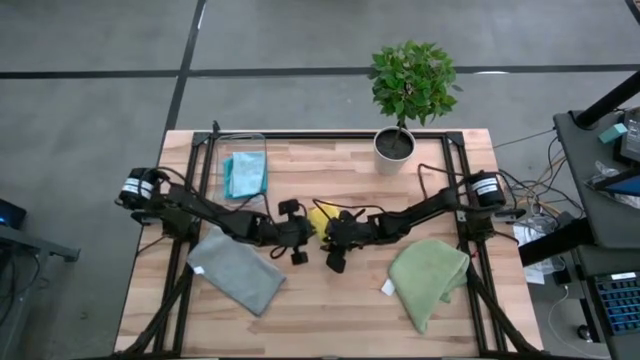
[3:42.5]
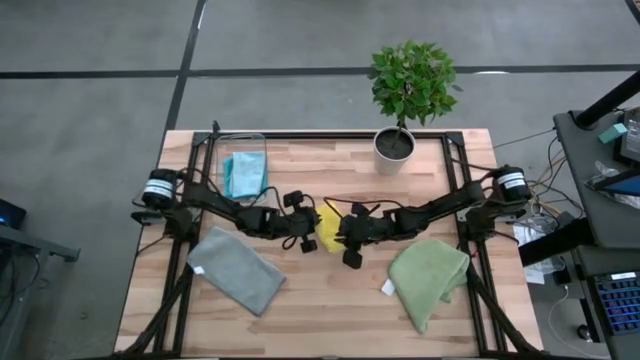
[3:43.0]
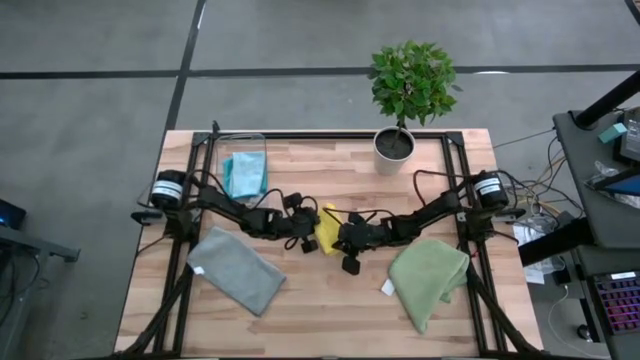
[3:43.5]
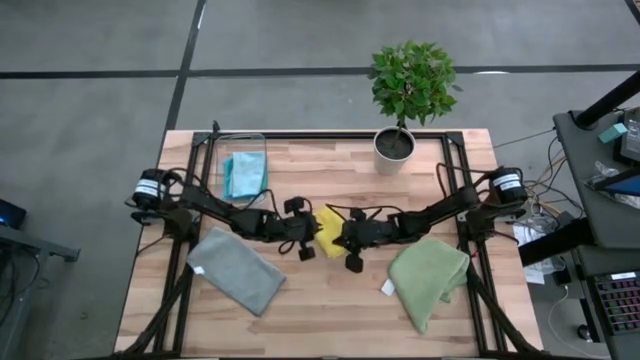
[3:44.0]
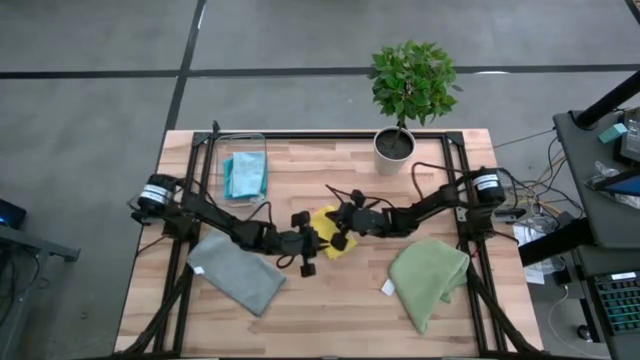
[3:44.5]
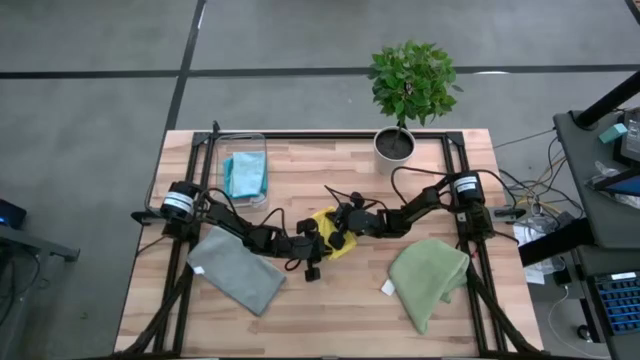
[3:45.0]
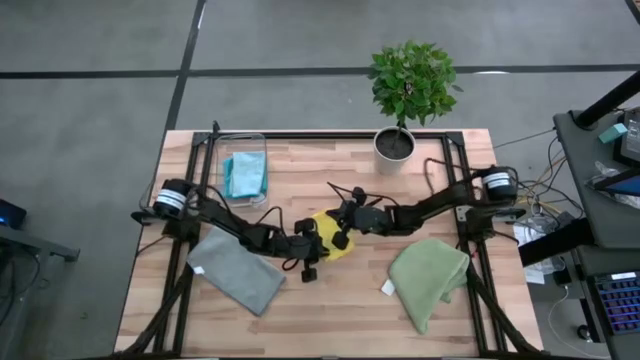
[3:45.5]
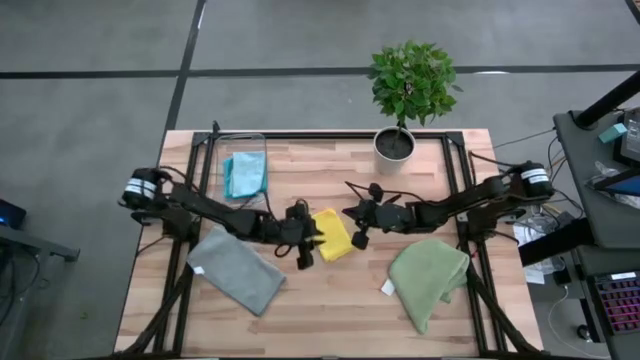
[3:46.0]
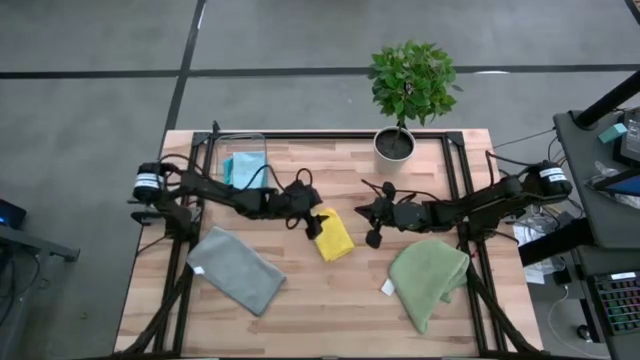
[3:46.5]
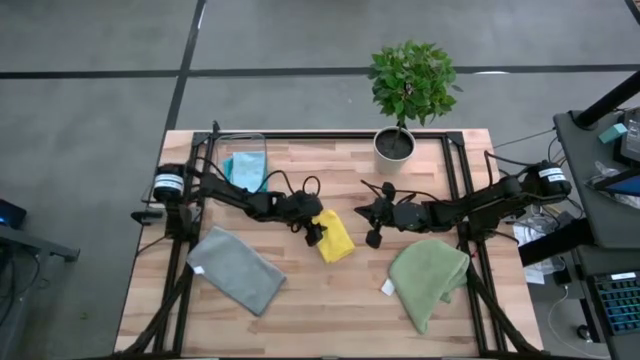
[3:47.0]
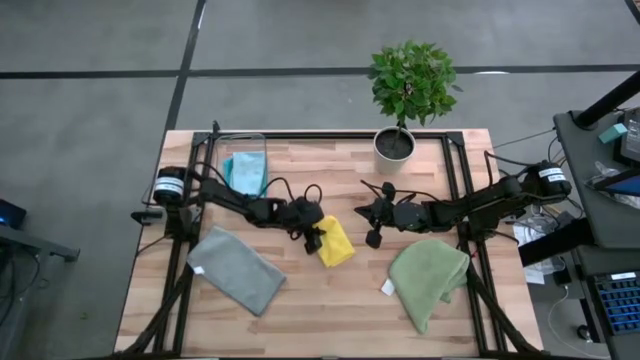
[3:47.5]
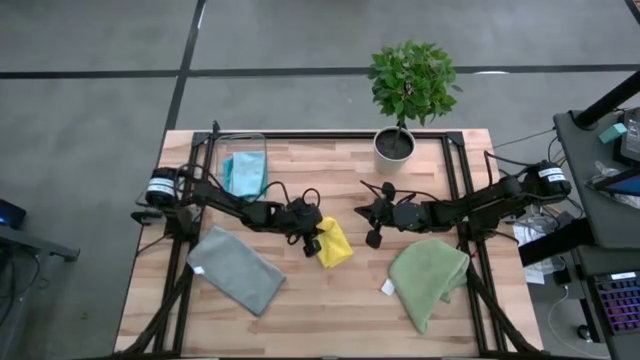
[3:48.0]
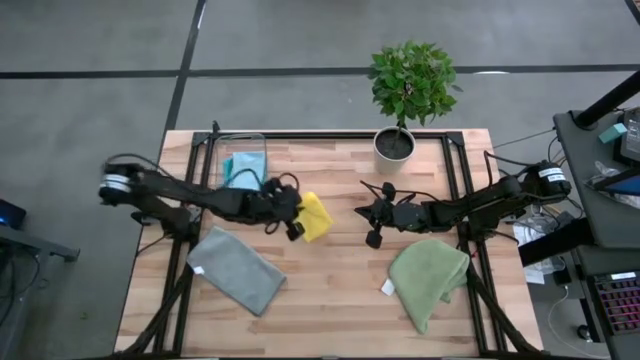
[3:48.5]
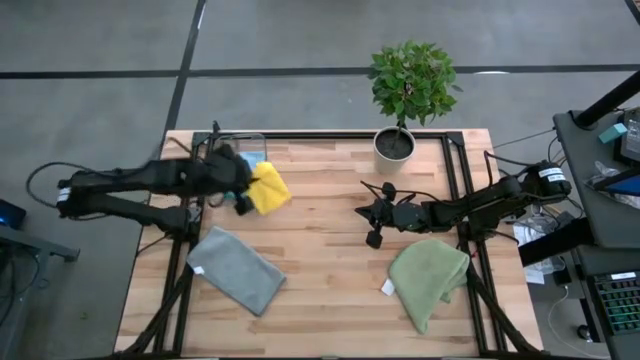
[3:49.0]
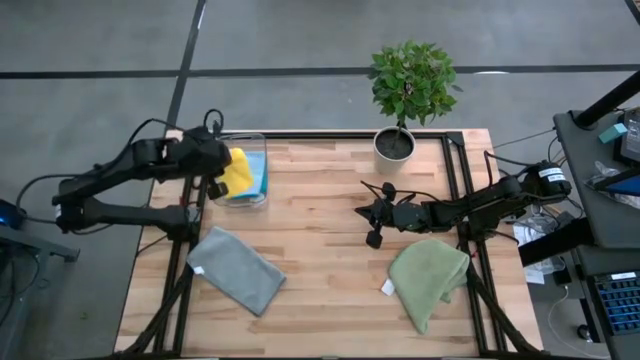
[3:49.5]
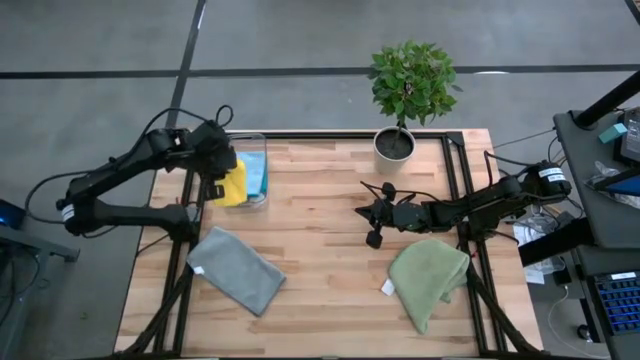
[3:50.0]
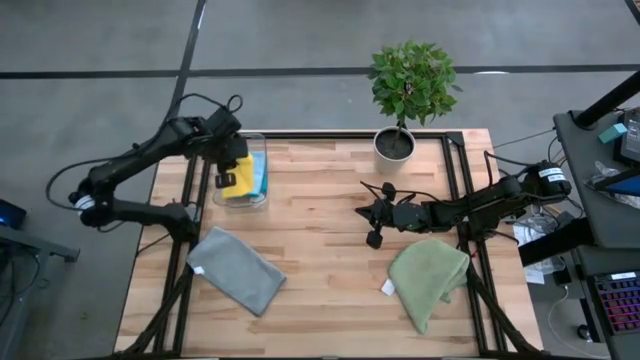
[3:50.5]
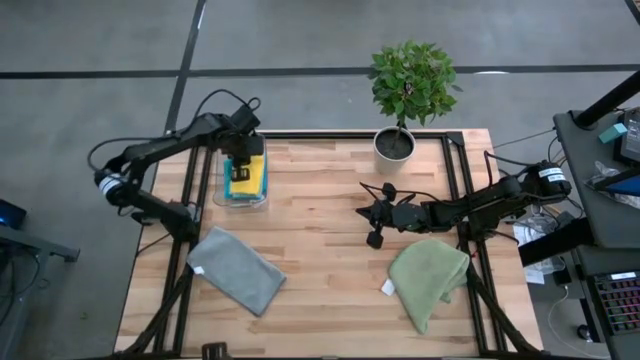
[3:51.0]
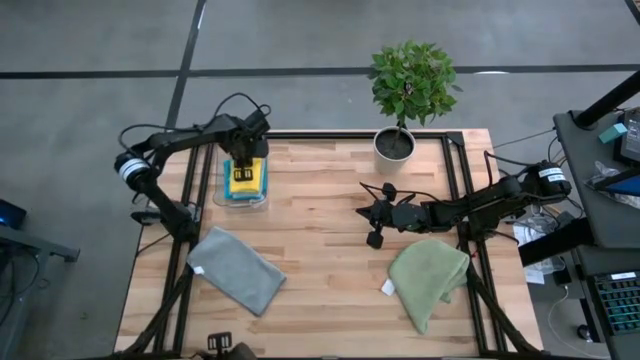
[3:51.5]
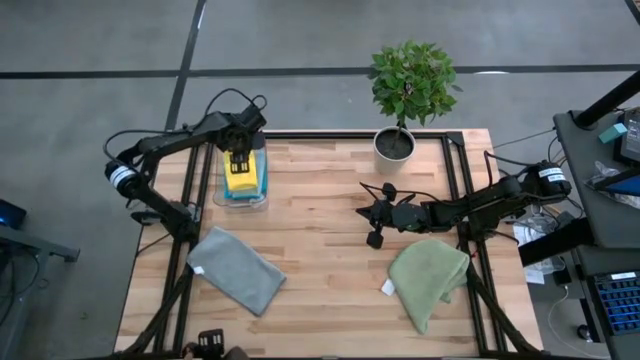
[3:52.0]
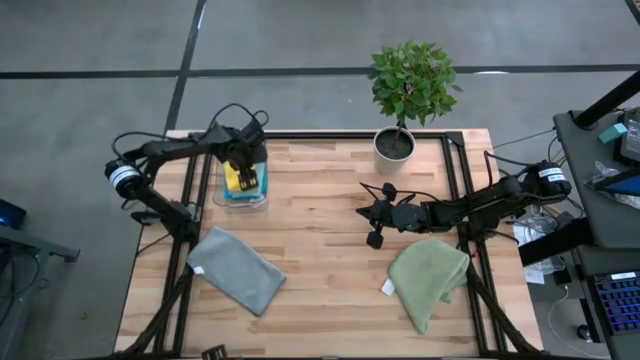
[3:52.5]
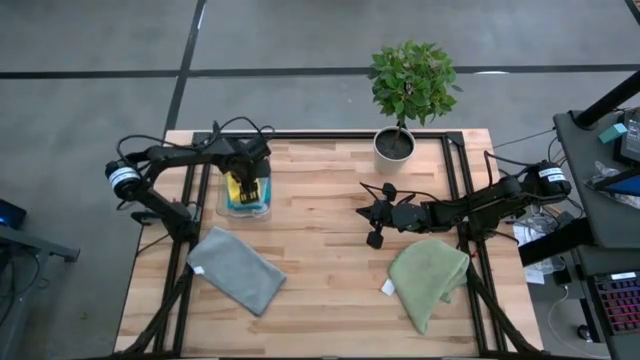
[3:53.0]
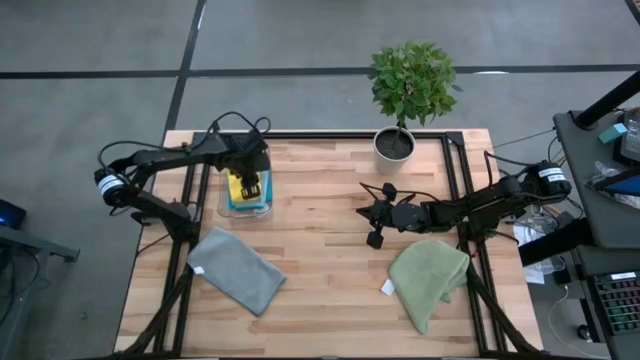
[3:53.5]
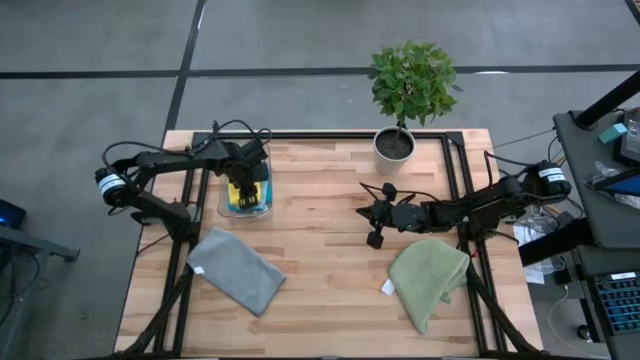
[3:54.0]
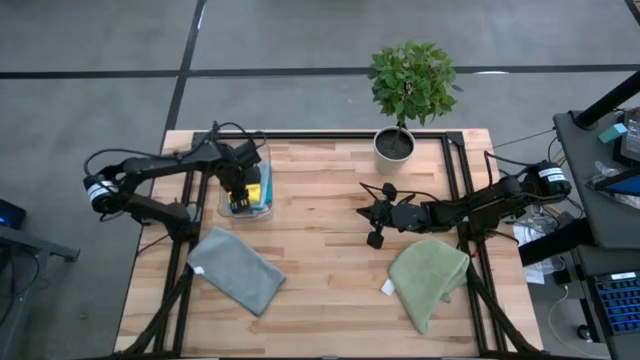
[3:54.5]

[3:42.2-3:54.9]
Task: Fold microfiber towels
Stack the folded yellow microfiber towel on top of the light blue microfiber towel on the bin

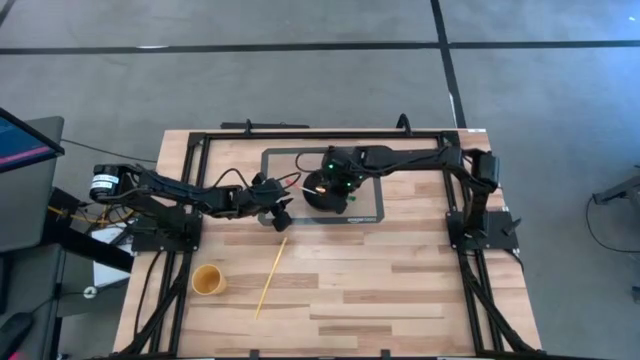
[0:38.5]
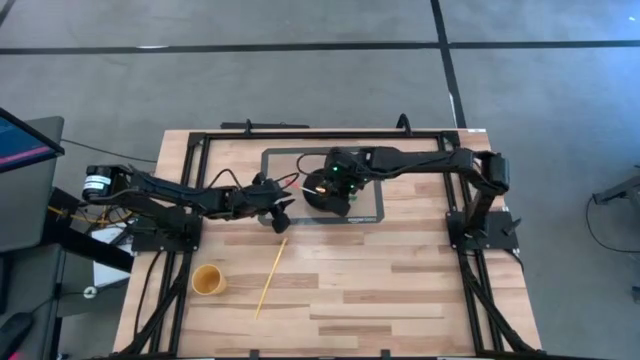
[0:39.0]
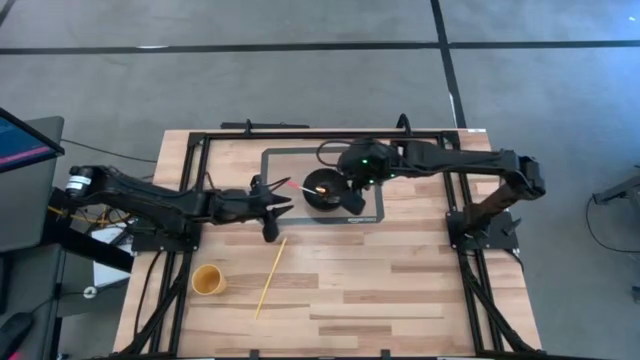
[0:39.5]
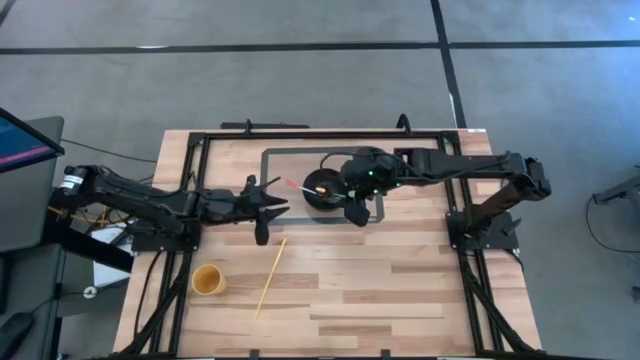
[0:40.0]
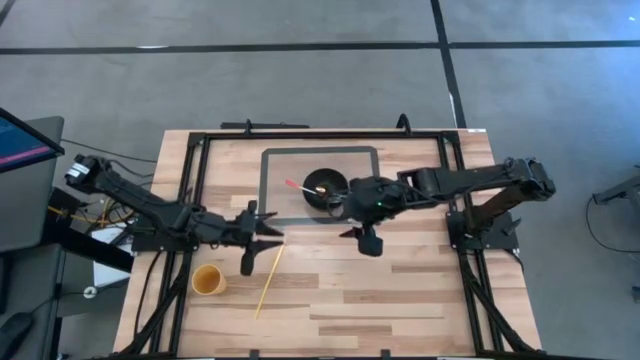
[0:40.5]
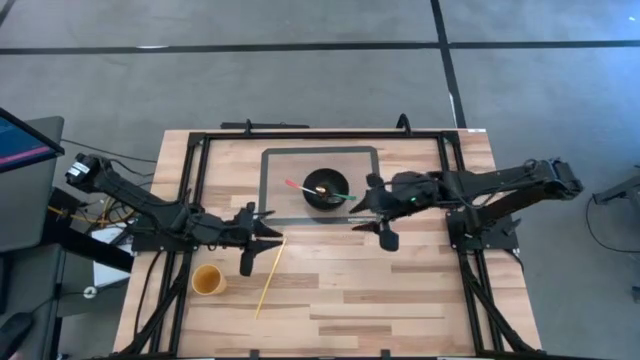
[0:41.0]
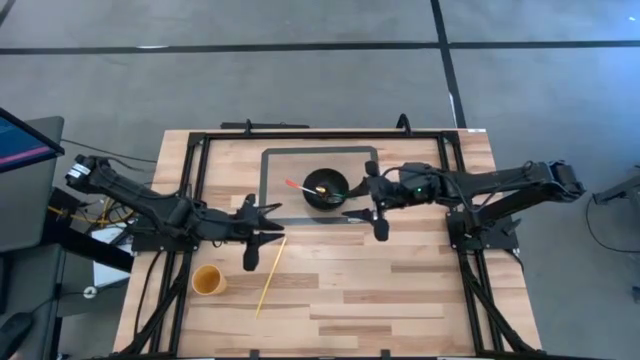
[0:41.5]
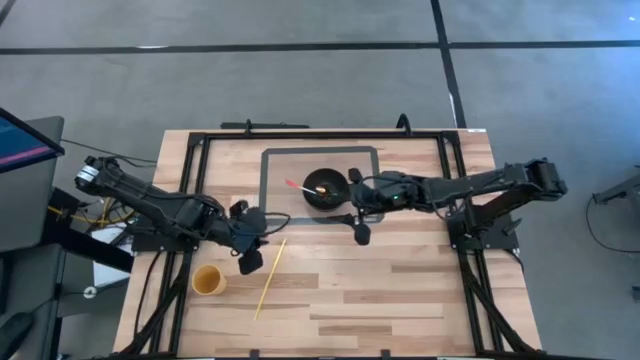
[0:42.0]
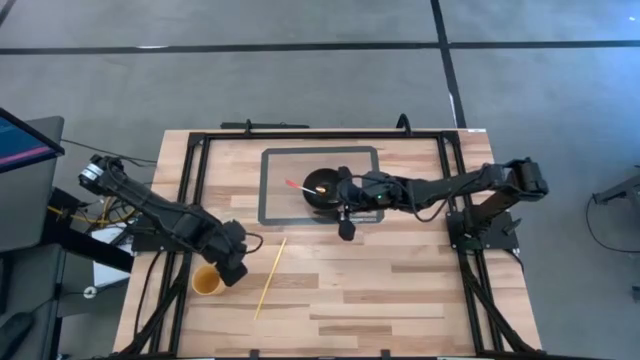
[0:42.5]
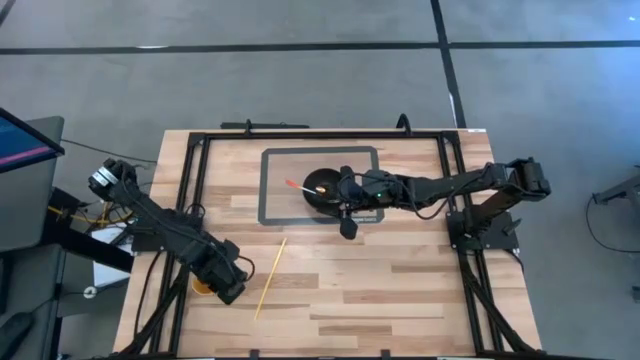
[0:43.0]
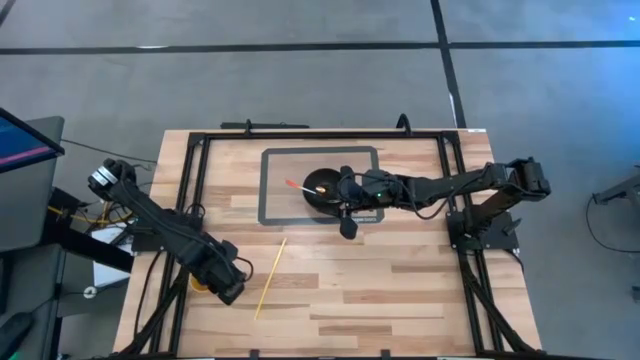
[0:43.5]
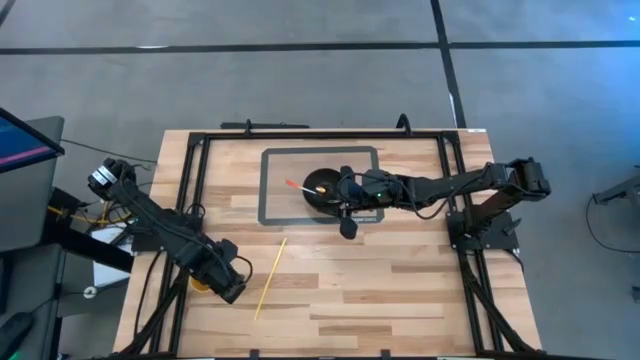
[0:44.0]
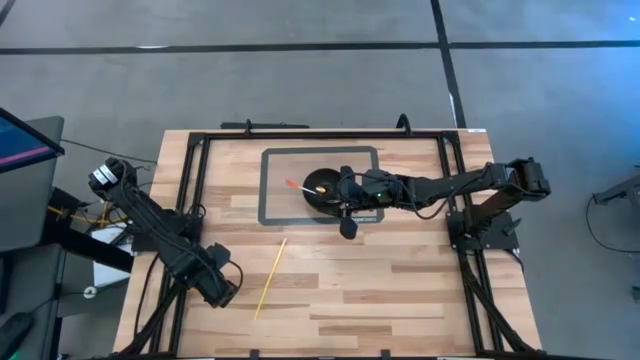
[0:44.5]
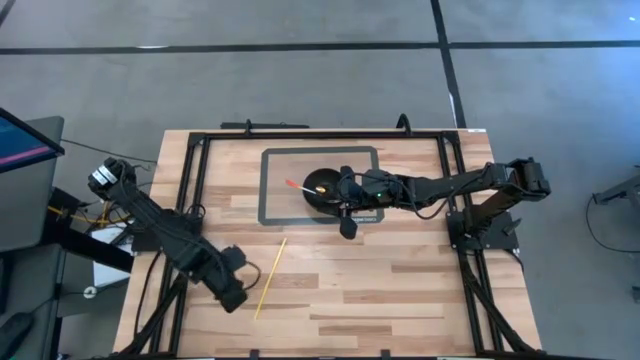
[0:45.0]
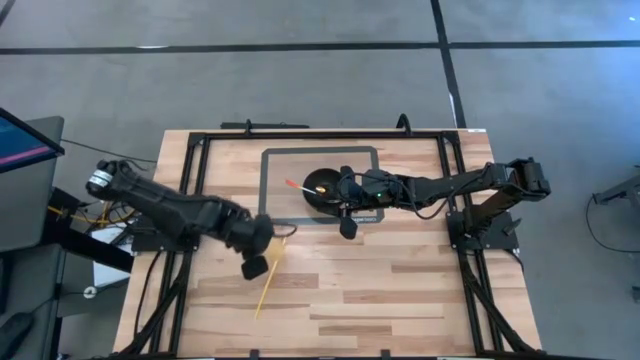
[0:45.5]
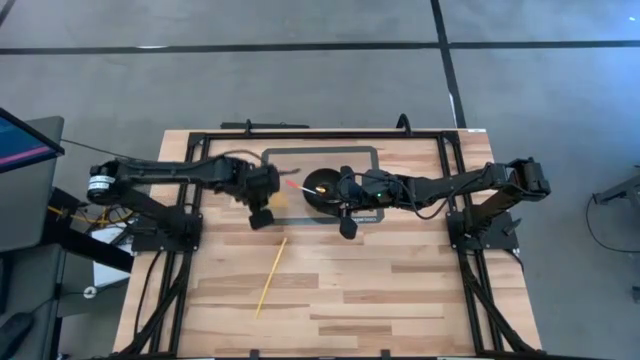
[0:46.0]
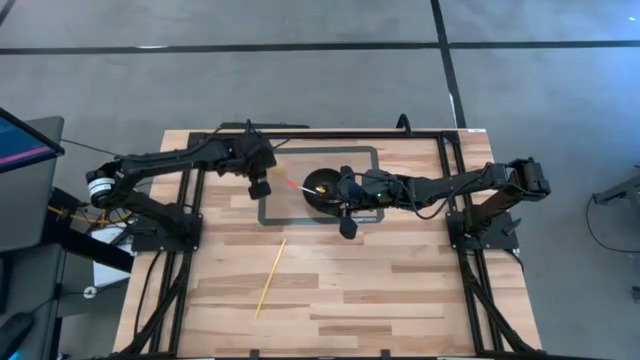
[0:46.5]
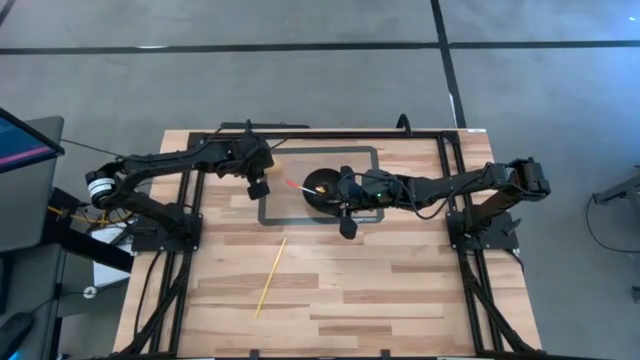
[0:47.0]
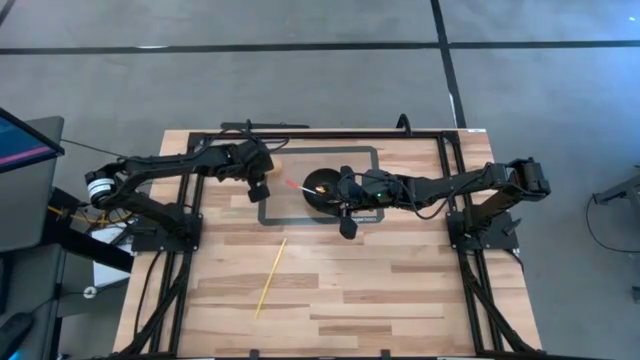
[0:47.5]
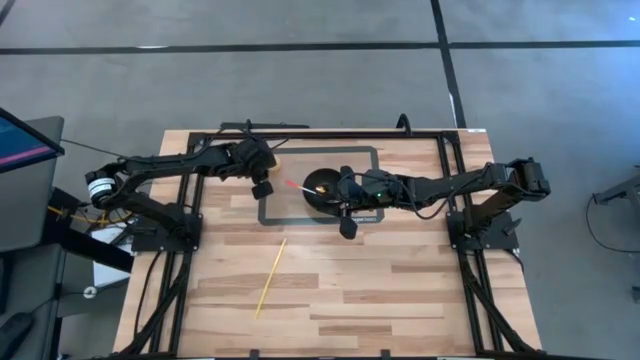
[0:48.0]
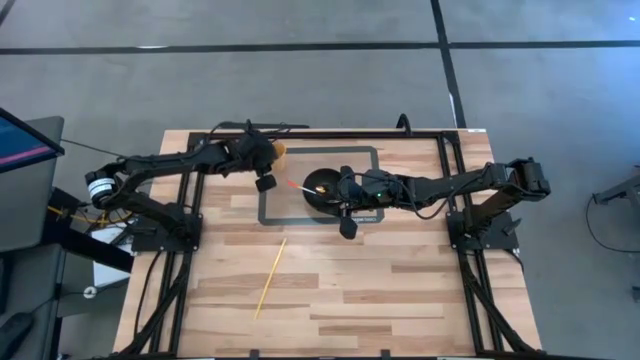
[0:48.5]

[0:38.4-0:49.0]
Task: Pick & Place Utensil
Put the yellow cup on the transparent silicone mat to the top right of the black bowl
